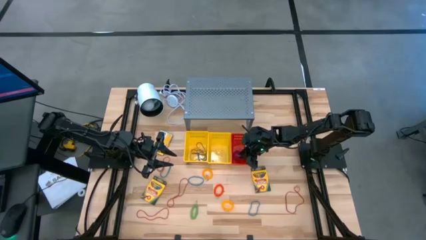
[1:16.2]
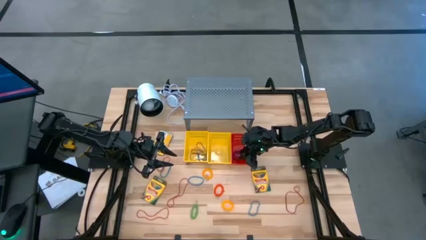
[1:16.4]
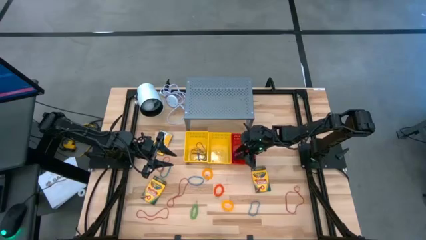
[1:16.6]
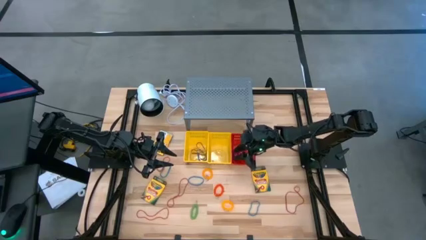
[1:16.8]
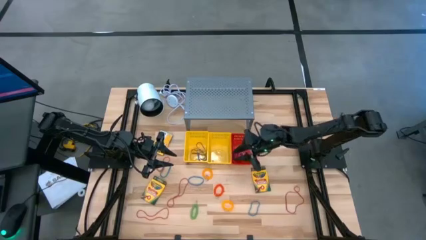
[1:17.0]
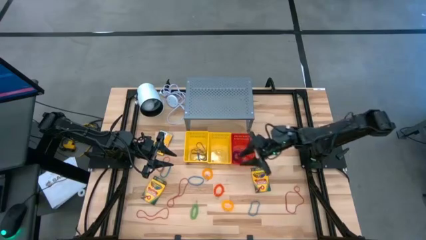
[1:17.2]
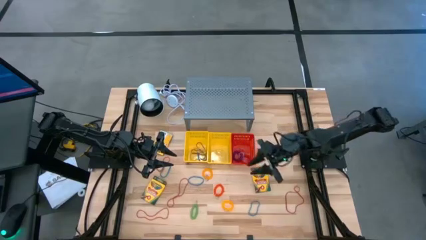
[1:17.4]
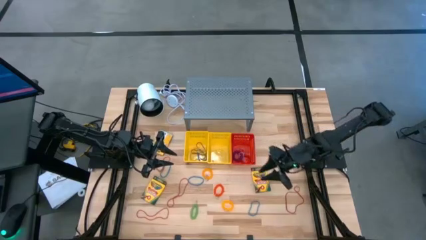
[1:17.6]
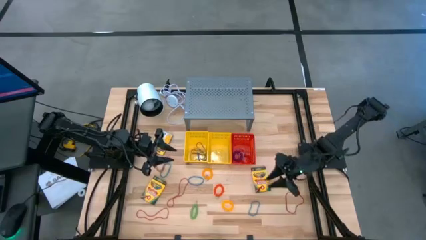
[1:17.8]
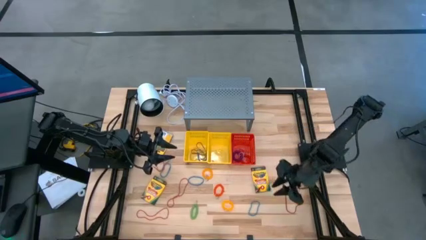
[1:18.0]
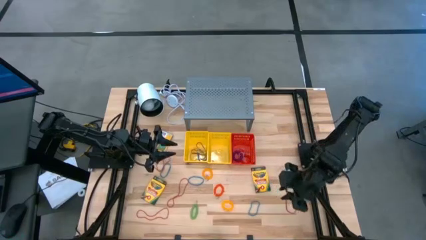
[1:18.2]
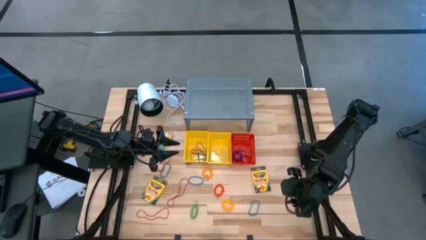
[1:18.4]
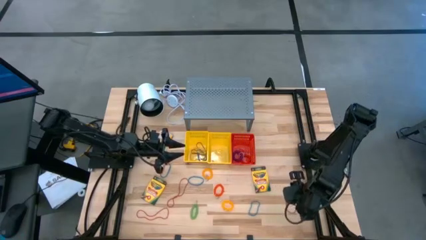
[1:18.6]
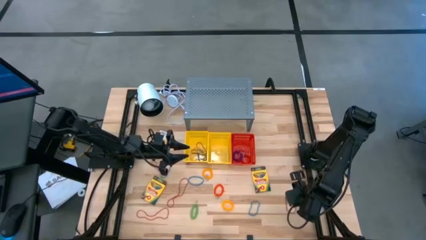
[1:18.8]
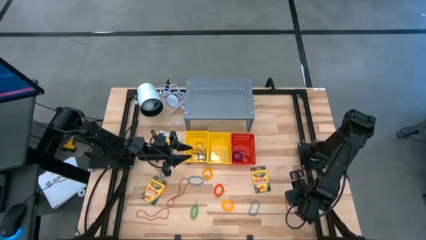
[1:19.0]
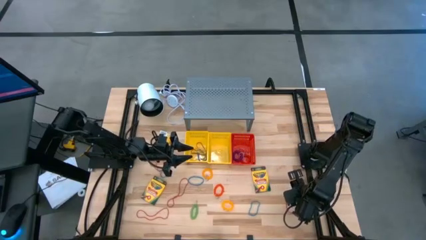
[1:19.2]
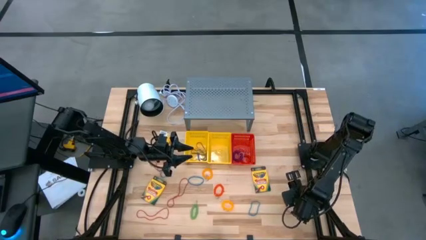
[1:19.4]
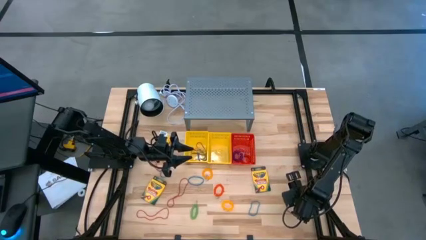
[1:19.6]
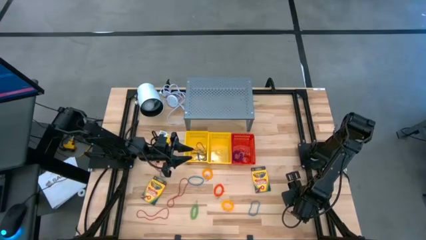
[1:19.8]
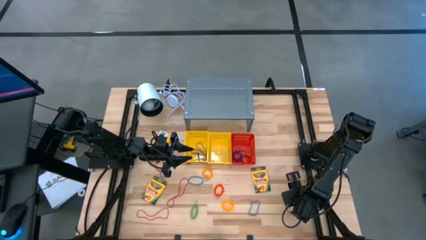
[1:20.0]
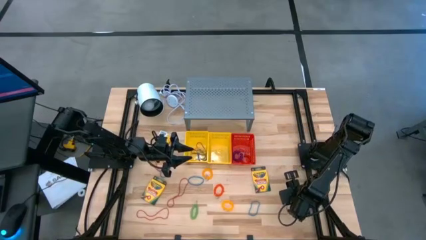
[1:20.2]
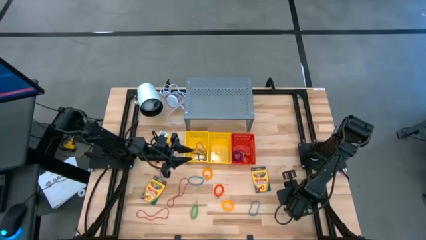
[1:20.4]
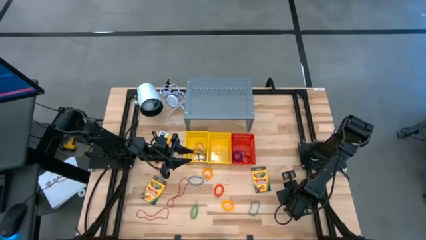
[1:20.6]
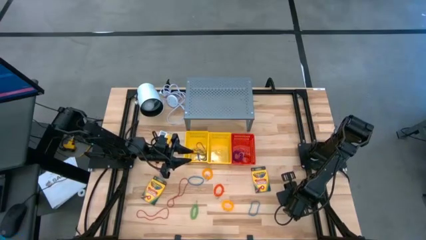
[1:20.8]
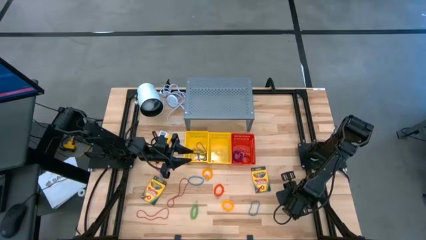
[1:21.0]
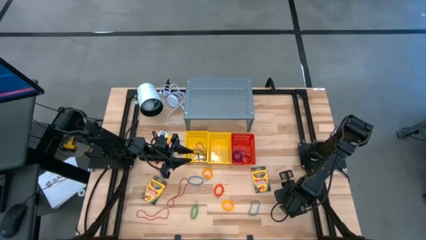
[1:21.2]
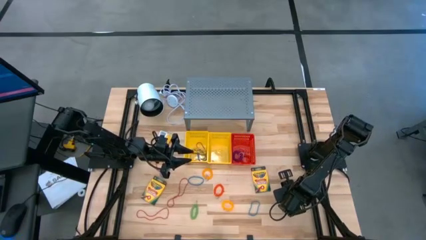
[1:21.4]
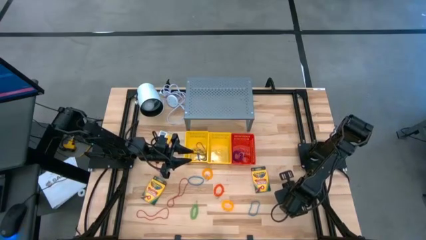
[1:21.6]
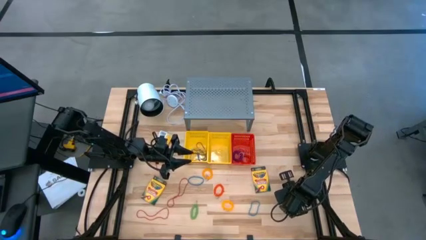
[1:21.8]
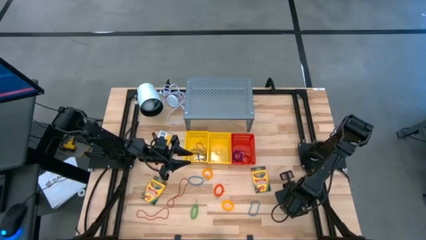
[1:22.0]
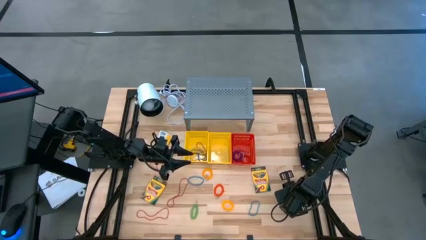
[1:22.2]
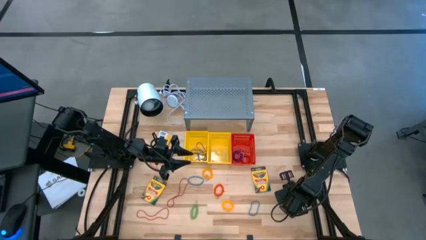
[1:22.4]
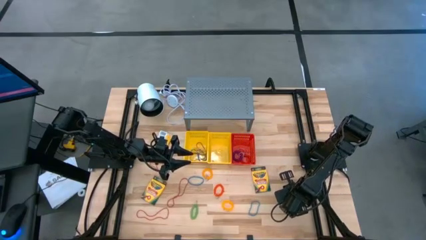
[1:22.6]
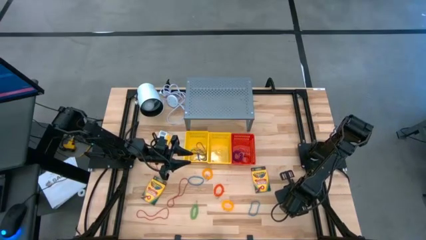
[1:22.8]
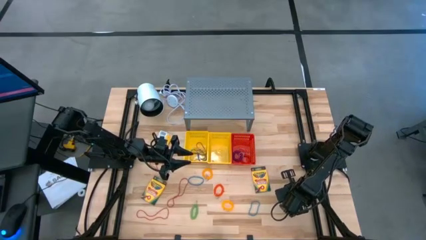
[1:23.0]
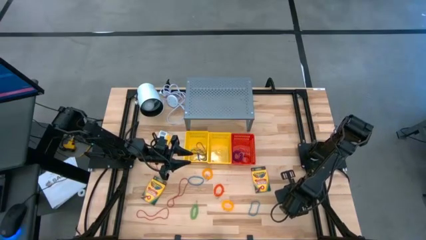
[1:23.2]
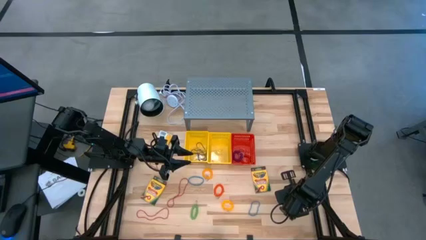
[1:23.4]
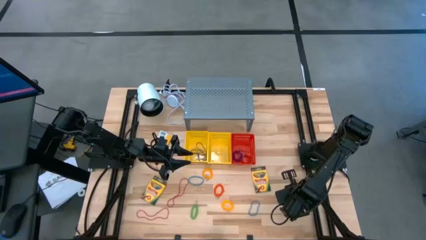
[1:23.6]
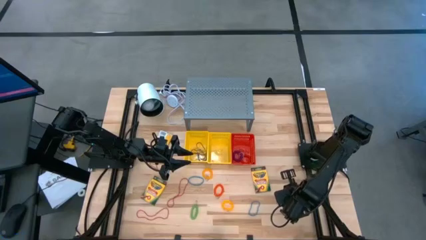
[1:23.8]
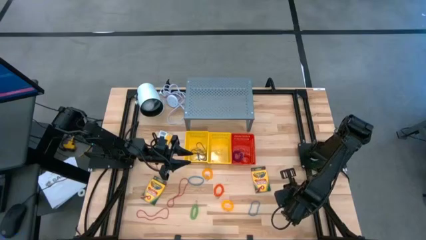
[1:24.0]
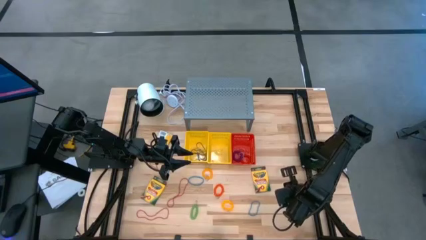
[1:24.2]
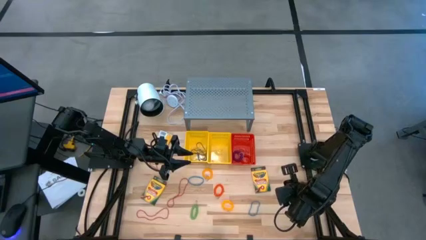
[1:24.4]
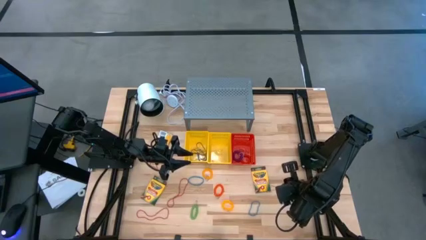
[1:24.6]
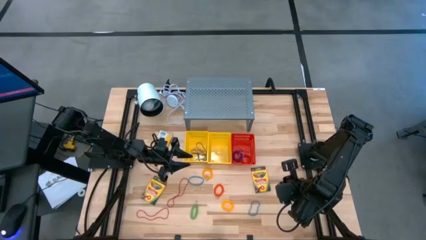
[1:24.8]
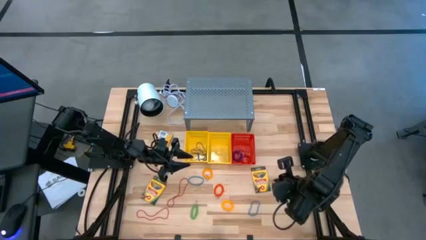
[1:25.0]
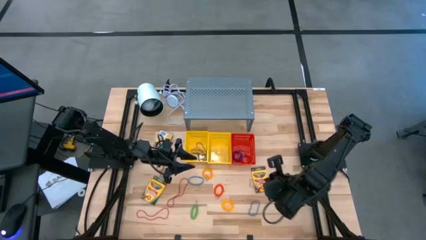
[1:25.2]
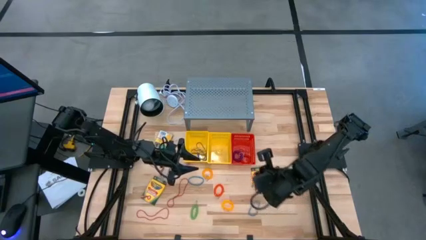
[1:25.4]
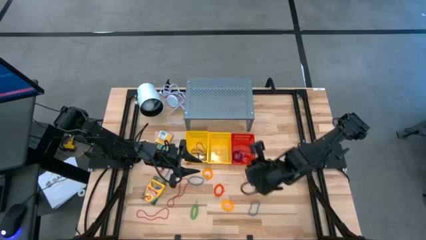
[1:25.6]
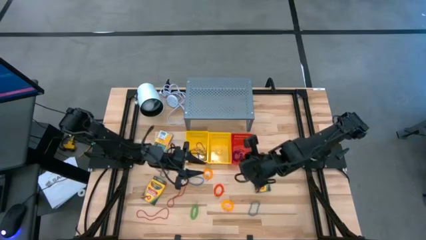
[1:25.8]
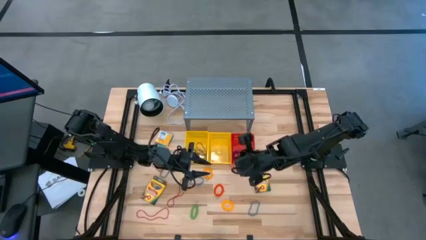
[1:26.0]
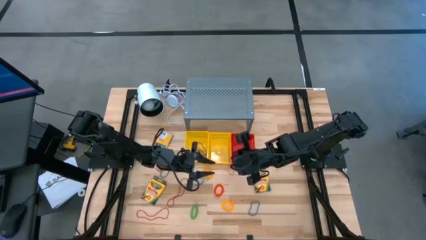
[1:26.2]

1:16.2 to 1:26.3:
Task: Pick & Place Office Desk Supplies
Put the red rubber band into the left yellow basket

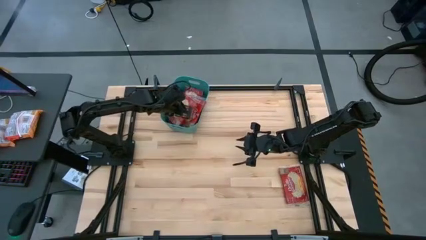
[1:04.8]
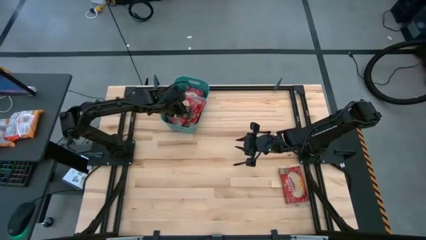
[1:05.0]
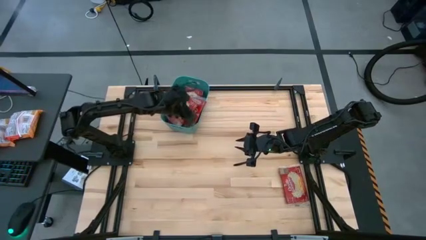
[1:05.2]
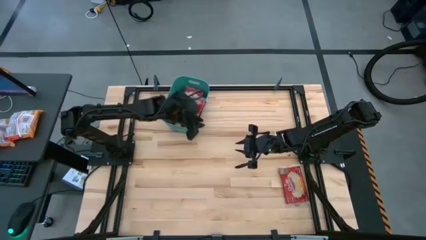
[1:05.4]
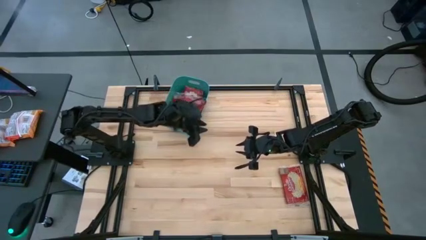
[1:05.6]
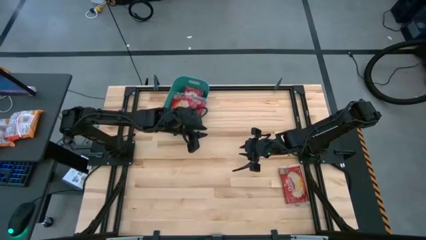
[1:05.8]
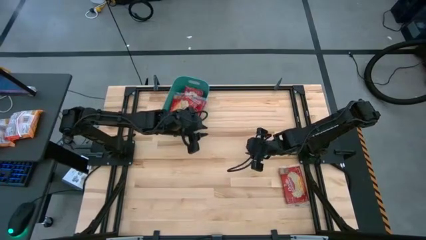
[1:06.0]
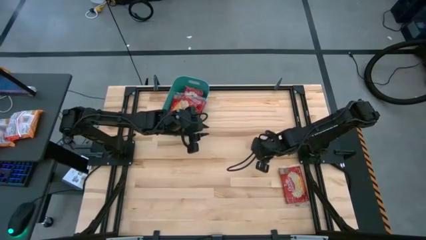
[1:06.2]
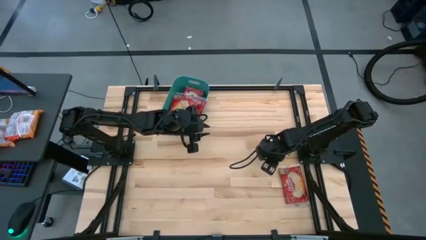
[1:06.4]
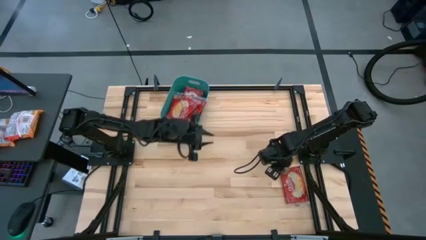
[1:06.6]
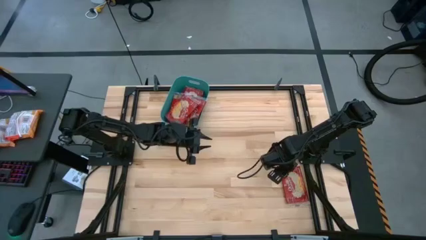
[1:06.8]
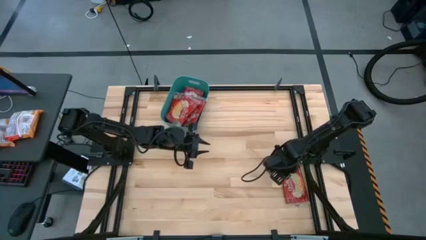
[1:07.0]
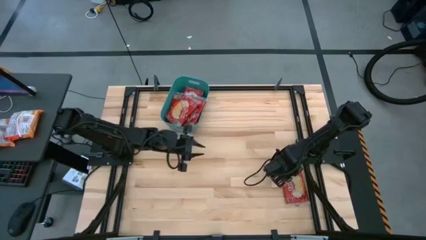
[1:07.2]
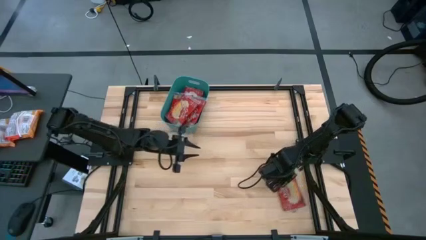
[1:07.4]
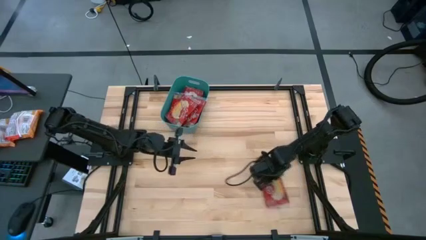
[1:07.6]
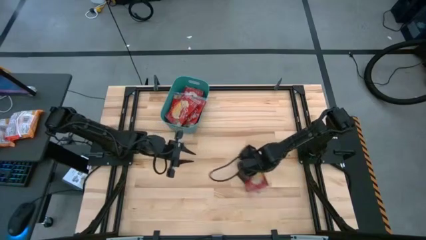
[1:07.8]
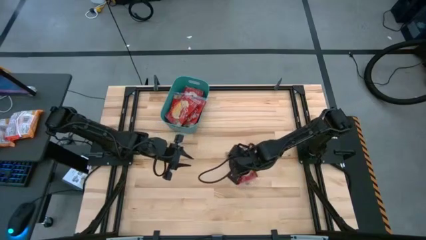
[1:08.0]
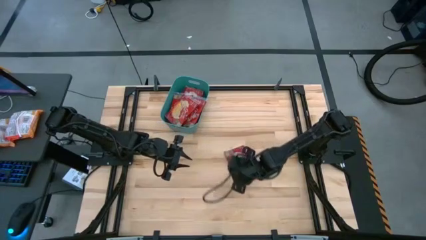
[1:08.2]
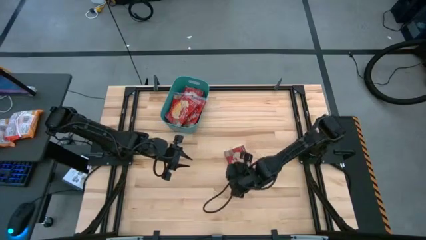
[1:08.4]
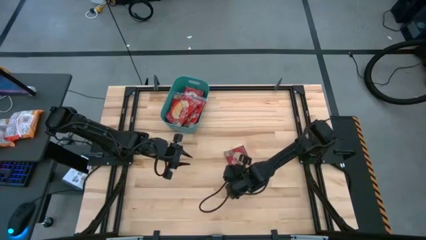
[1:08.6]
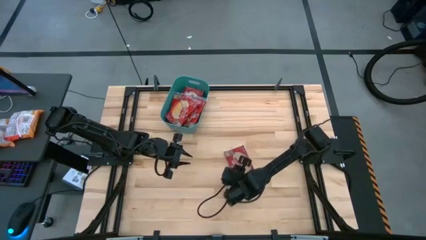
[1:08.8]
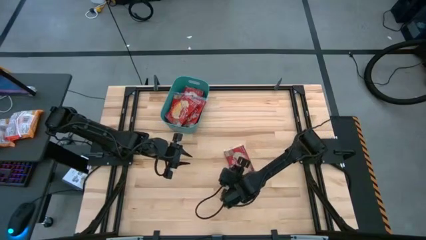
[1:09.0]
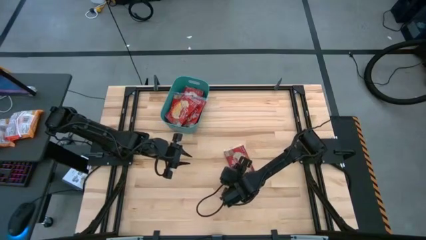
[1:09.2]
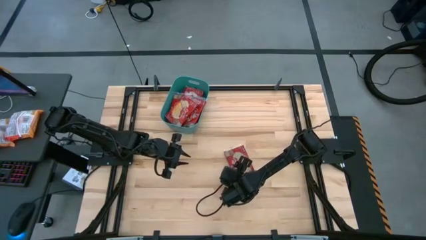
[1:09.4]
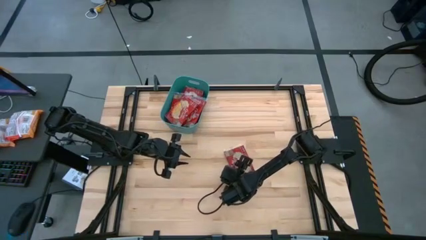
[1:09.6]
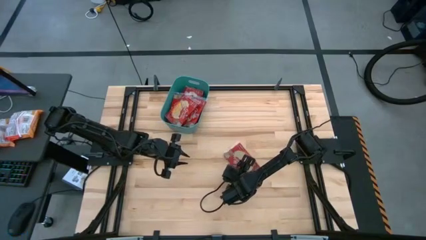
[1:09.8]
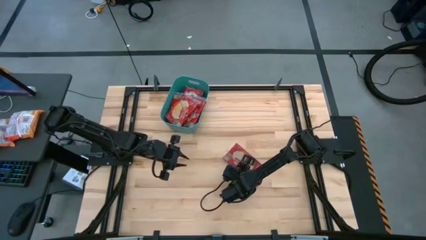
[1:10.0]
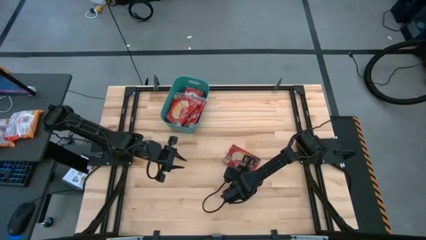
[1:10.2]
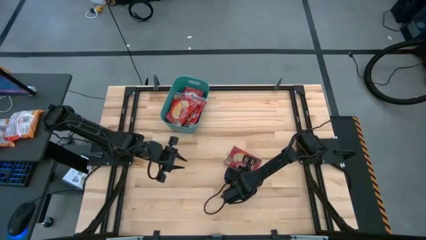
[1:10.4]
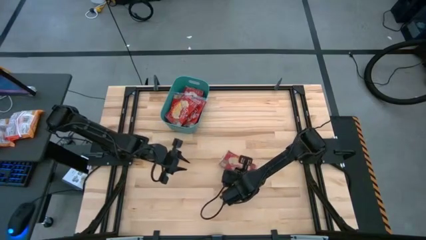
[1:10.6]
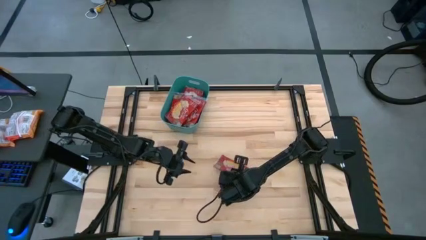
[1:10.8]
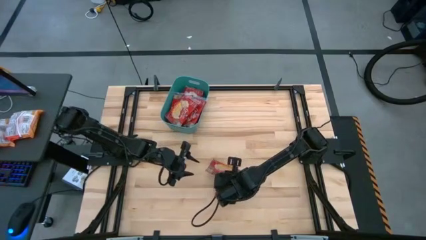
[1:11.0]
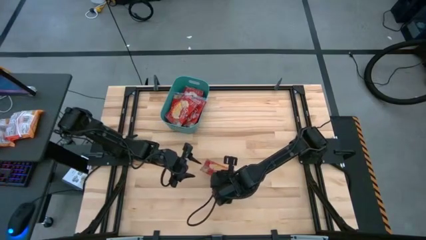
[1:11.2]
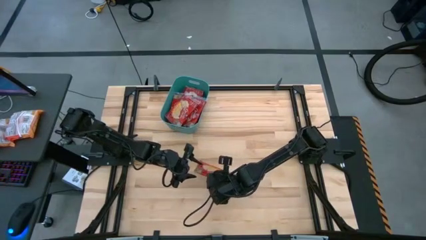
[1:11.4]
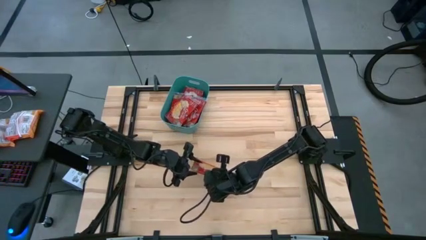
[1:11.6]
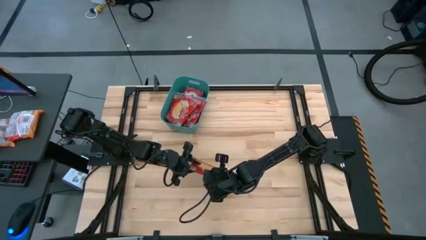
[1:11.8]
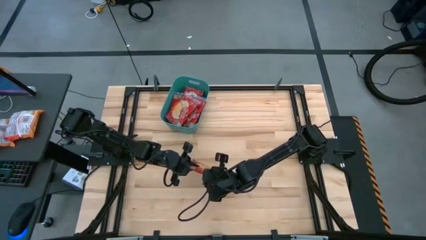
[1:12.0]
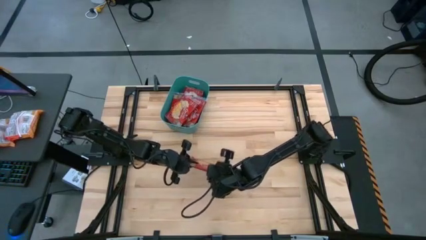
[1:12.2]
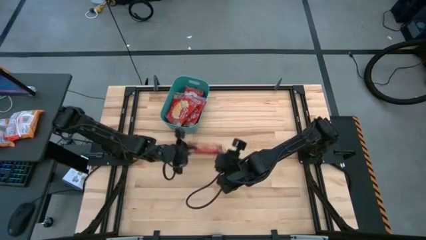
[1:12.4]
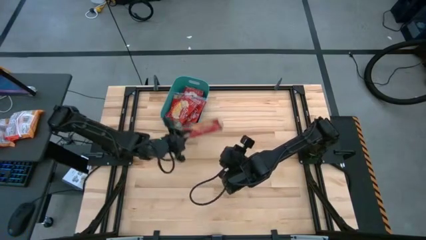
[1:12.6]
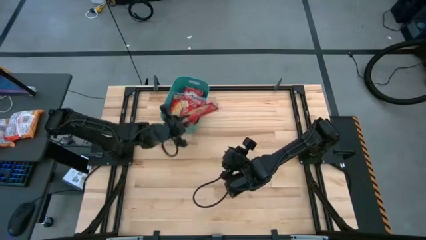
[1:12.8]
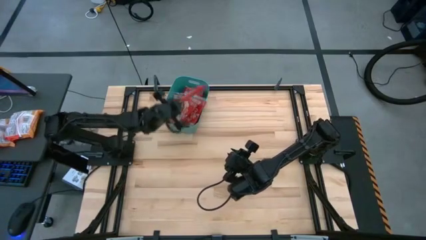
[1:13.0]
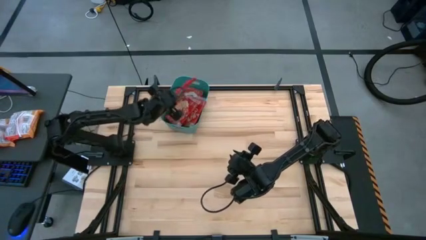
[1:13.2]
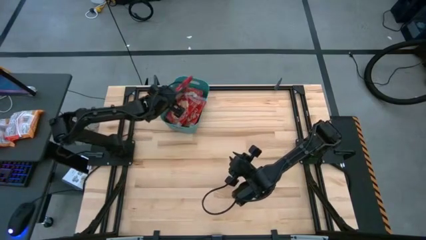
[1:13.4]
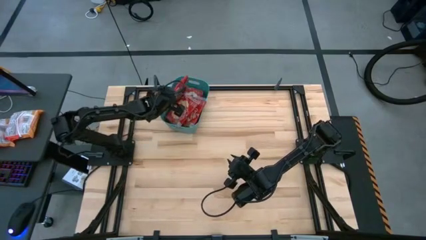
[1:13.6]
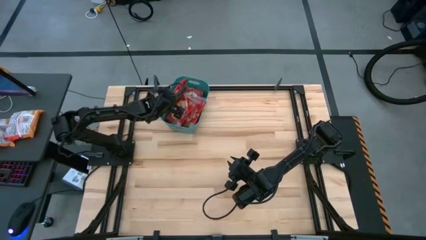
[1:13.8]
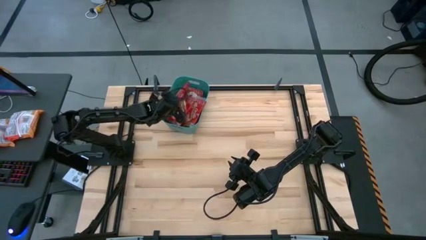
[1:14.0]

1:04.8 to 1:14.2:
Task: Sort popcorn bags into baskets
Put the red popcorn bag into the green bin
